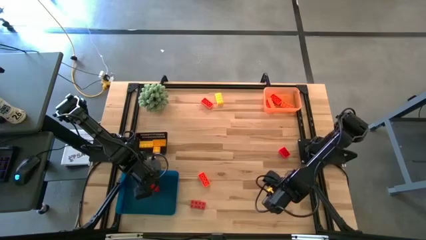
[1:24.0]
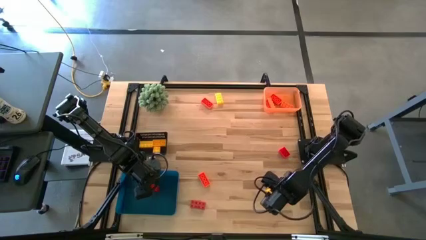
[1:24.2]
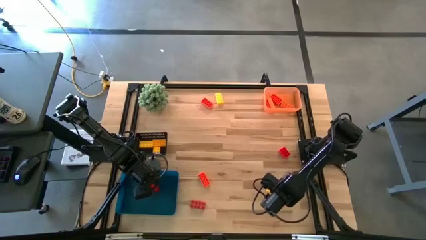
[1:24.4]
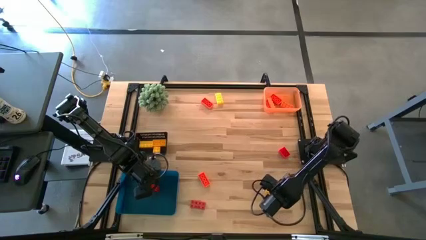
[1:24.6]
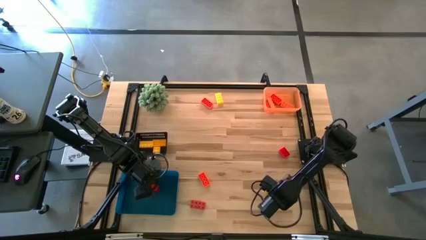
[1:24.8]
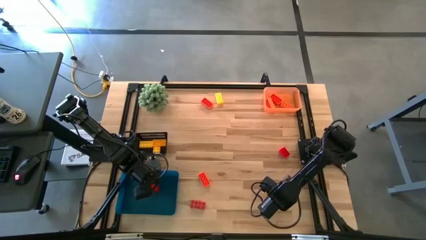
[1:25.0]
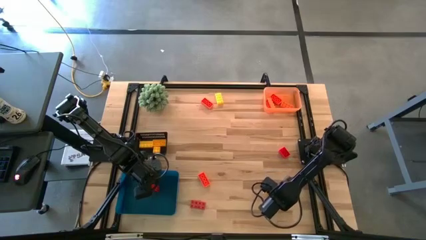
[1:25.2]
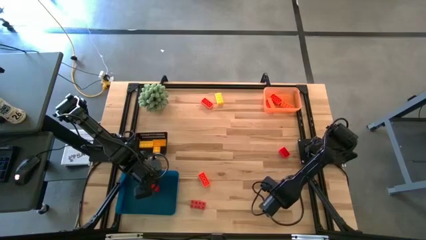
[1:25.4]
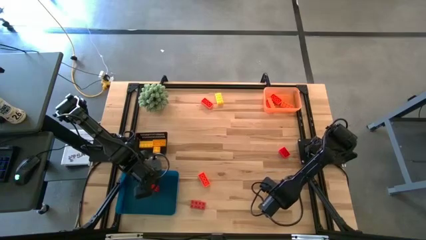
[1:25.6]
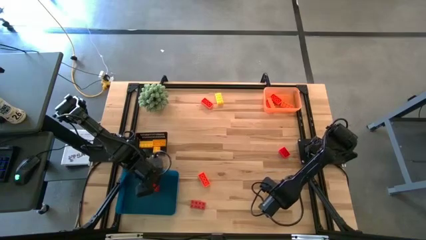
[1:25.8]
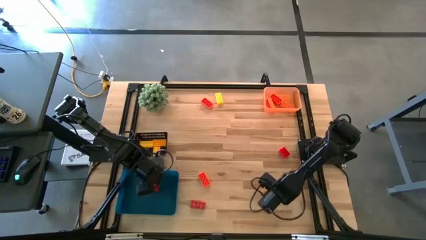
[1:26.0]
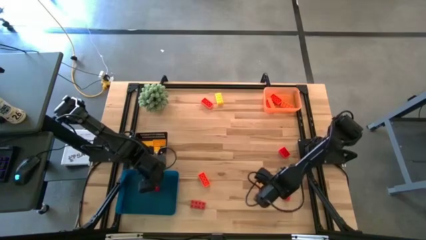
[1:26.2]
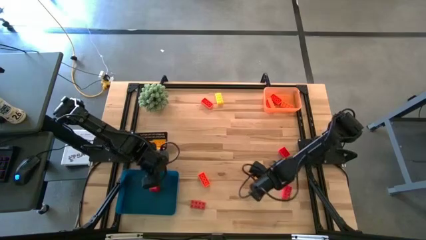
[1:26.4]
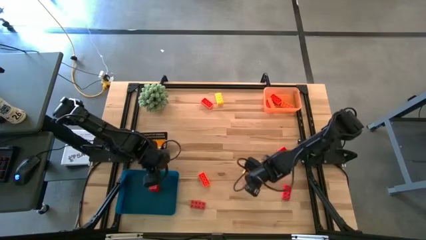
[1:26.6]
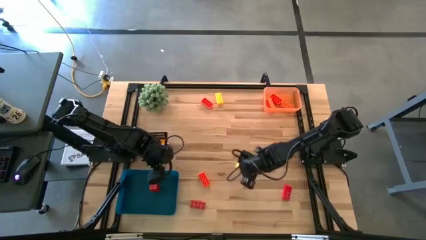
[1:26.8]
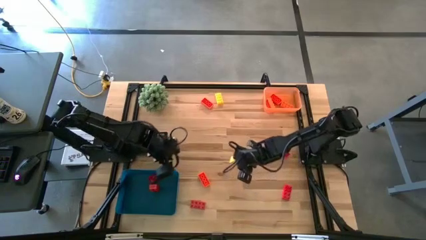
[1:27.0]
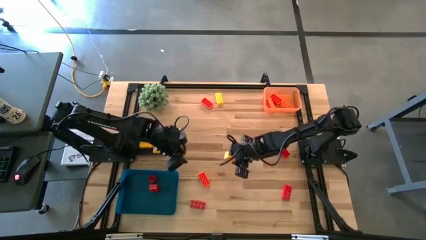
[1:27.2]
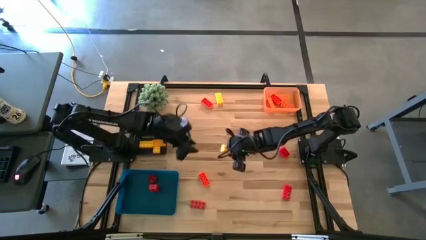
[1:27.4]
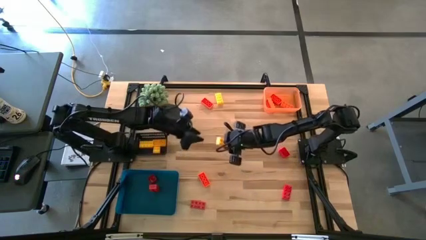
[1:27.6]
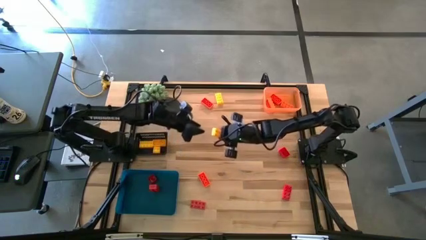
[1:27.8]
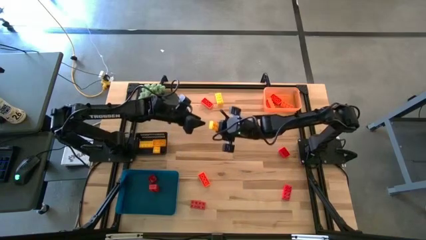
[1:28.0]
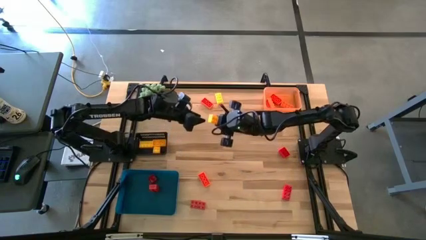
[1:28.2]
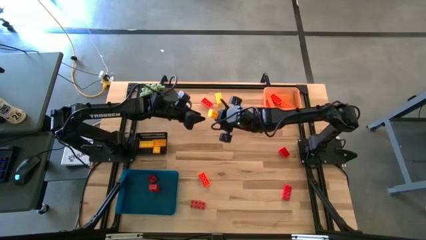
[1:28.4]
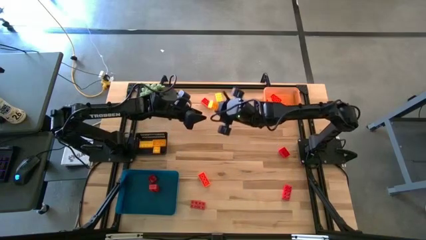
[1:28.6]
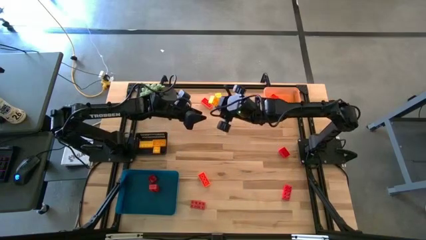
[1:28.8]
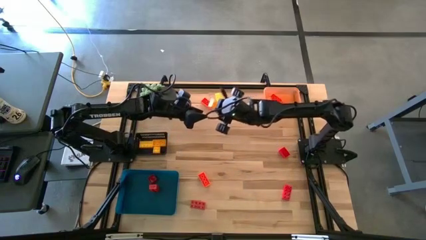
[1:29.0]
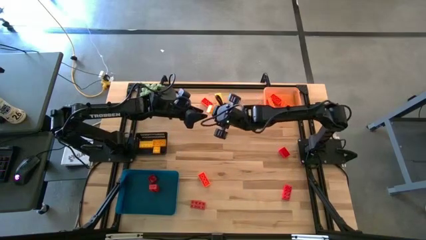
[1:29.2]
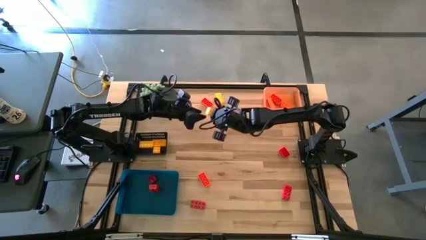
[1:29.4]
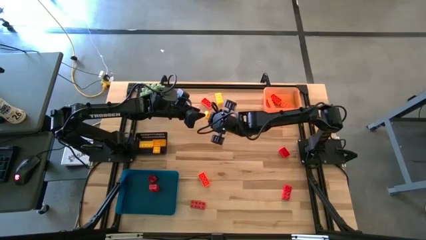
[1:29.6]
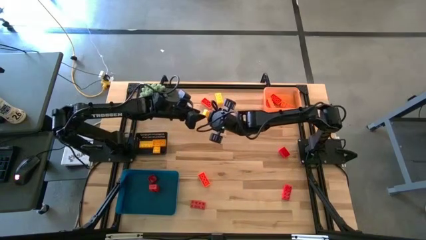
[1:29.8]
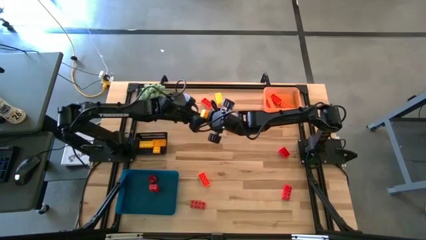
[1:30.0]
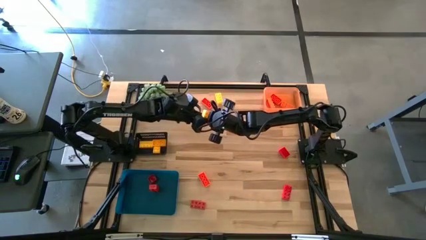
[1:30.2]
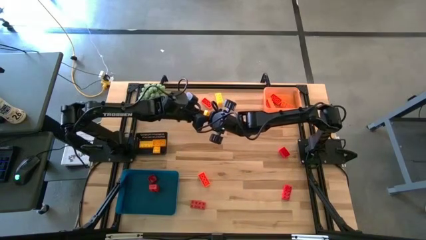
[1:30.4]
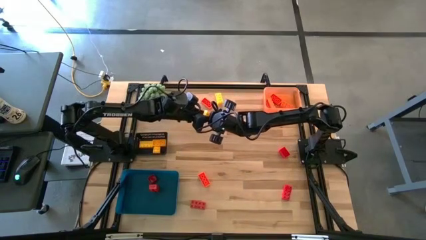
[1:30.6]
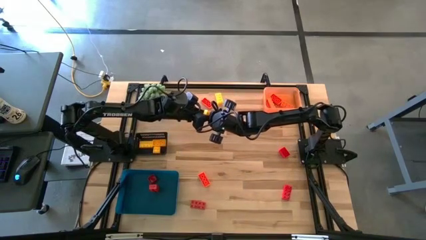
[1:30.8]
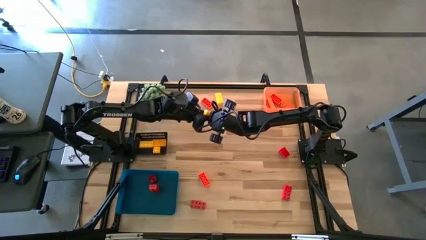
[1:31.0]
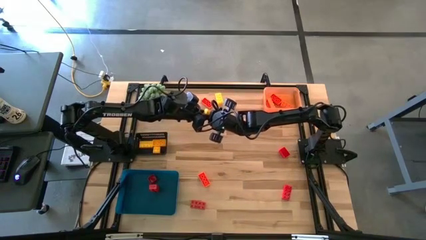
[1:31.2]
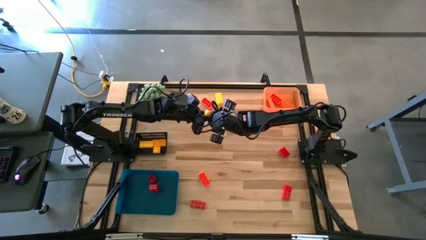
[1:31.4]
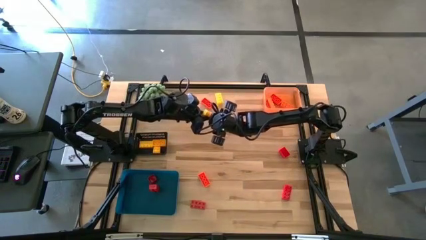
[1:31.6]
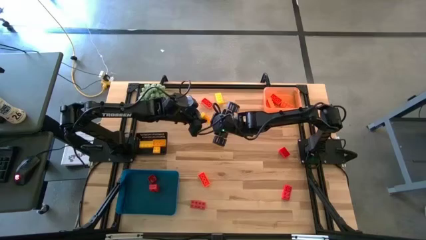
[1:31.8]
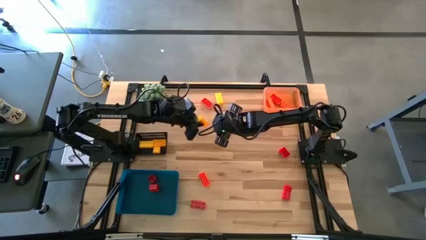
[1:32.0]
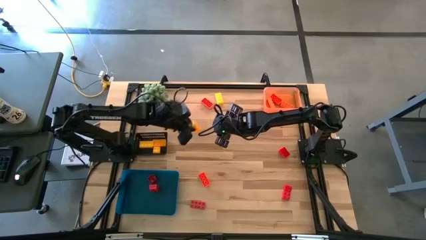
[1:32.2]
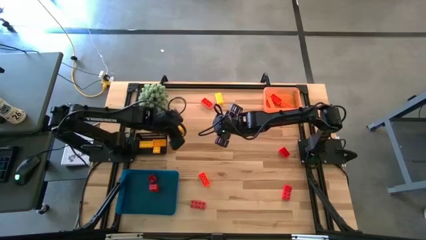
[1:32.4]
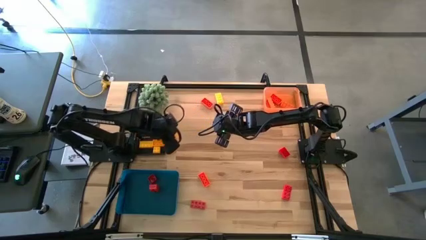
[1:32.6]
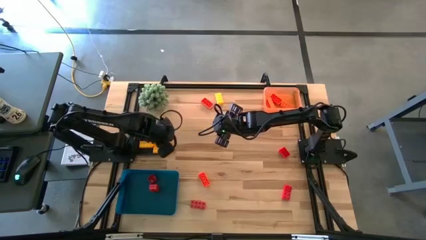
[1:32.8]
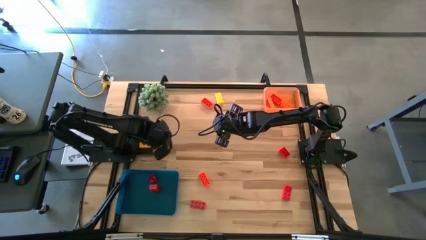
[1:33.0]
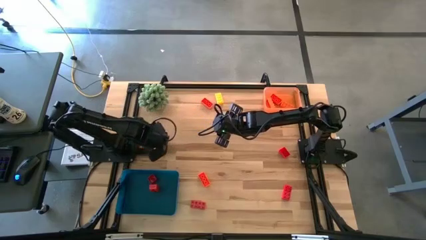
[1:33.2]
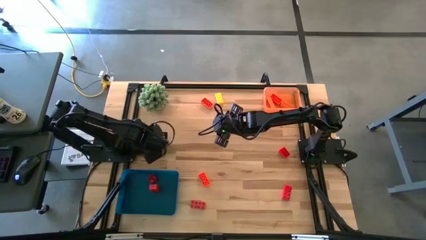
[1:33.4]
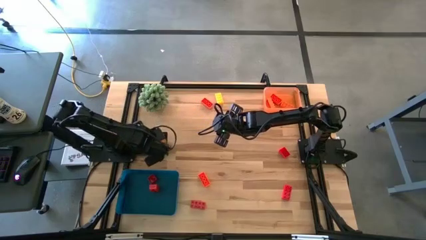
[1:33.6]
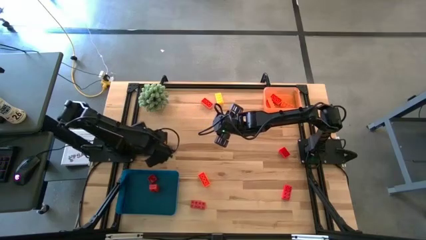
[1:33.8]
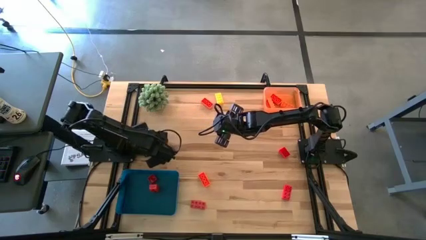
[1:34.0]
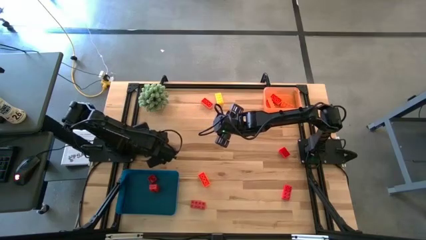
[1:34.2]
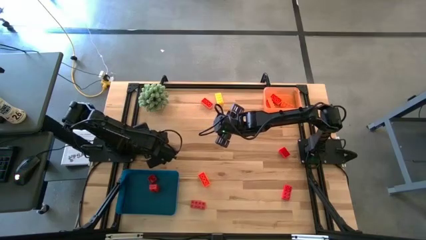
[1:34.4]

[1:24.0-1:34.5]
Task: Sort & place blocks by color
Put the yellow game piece into the black bin

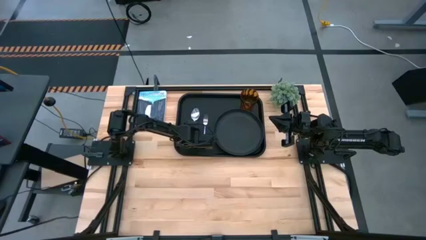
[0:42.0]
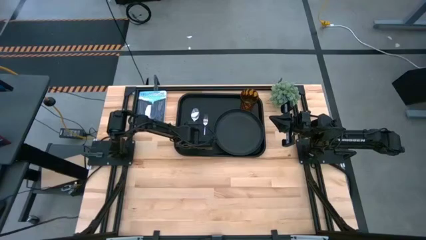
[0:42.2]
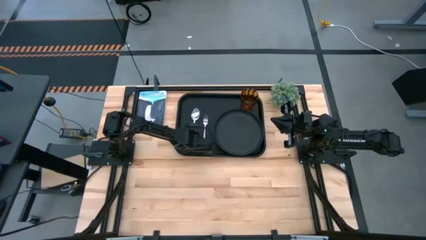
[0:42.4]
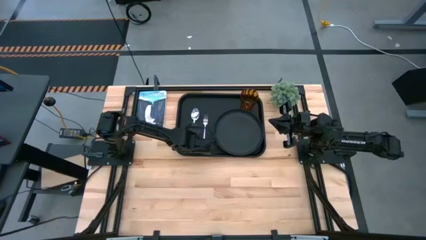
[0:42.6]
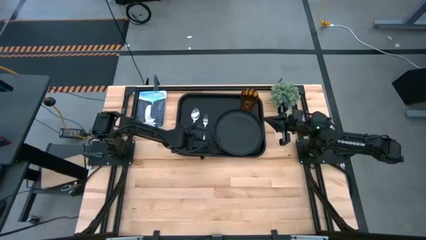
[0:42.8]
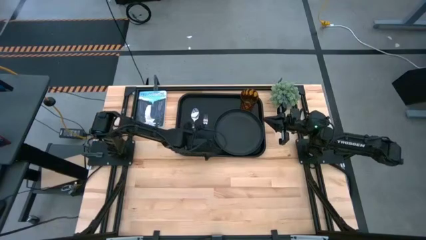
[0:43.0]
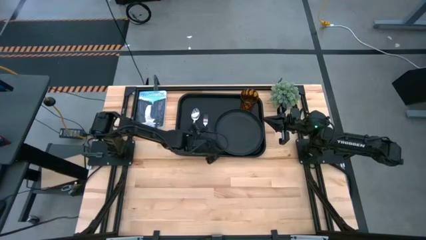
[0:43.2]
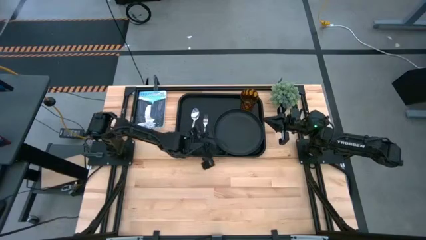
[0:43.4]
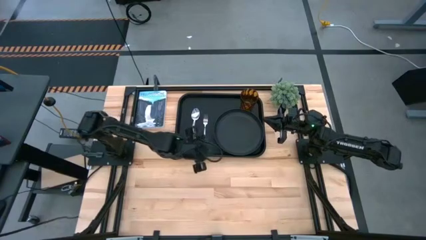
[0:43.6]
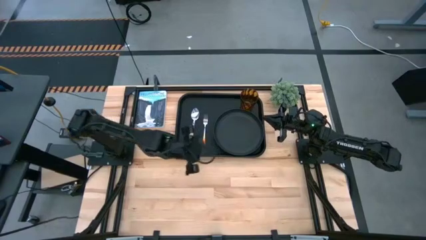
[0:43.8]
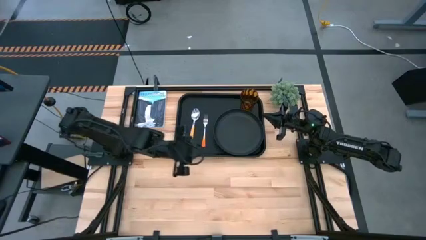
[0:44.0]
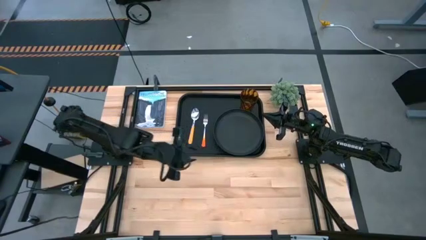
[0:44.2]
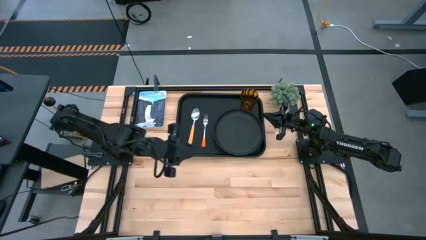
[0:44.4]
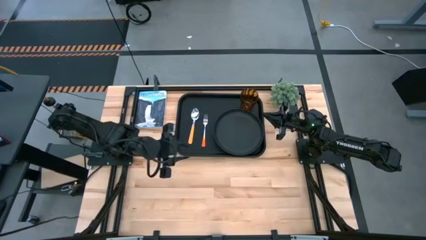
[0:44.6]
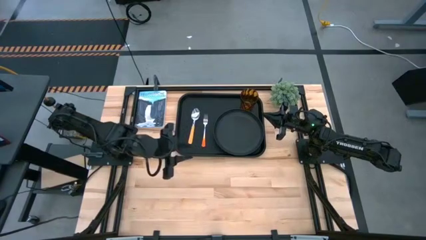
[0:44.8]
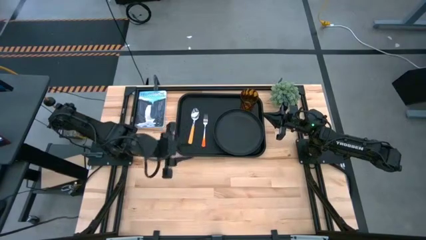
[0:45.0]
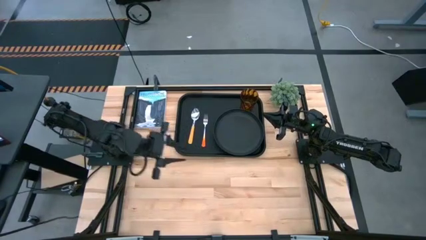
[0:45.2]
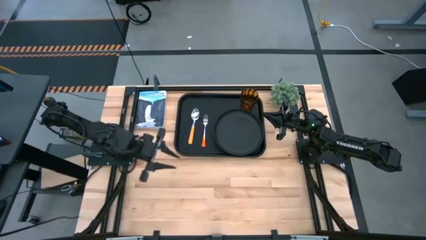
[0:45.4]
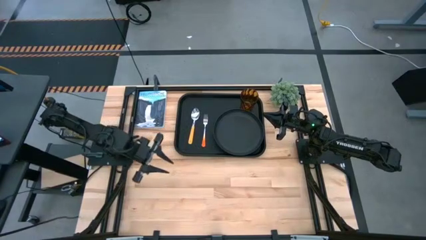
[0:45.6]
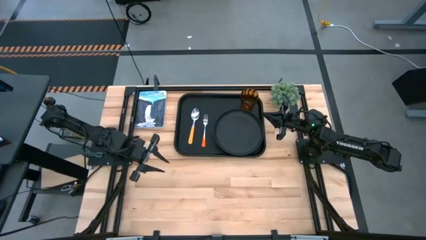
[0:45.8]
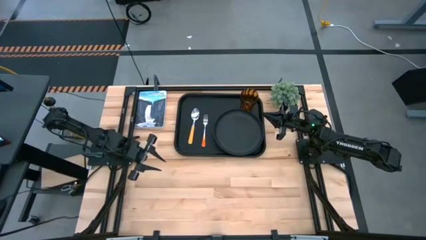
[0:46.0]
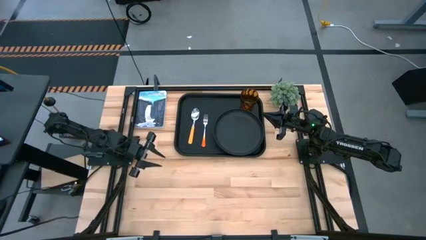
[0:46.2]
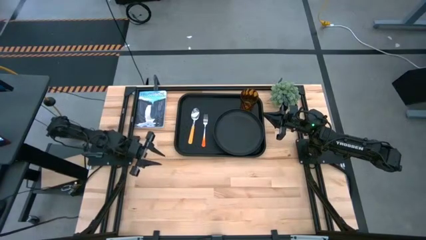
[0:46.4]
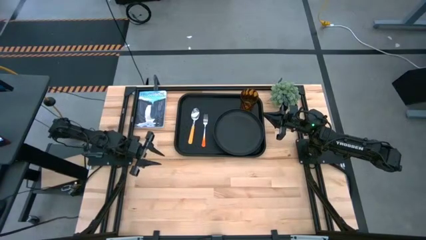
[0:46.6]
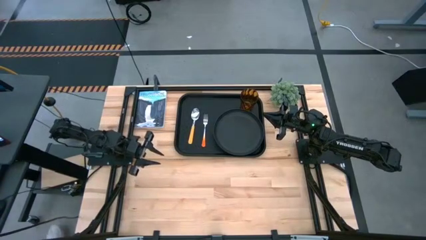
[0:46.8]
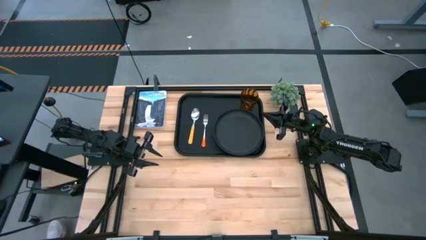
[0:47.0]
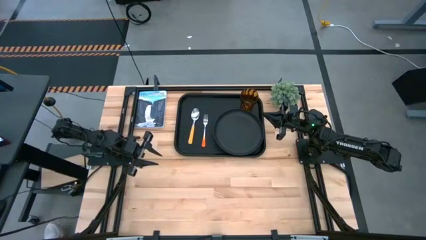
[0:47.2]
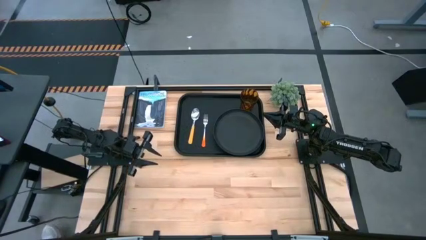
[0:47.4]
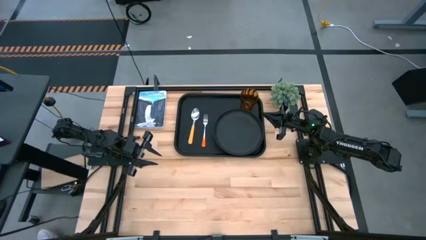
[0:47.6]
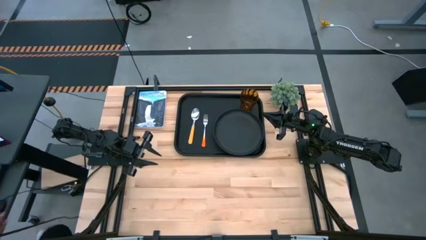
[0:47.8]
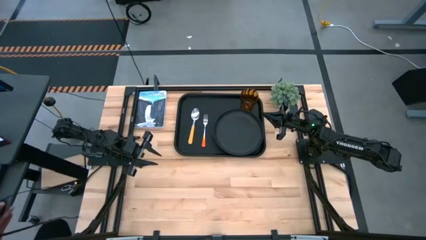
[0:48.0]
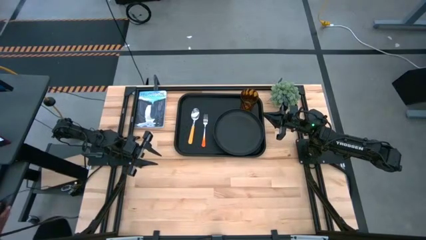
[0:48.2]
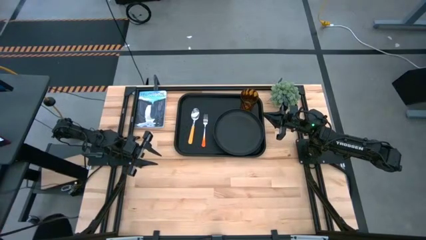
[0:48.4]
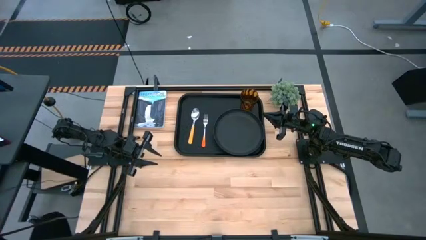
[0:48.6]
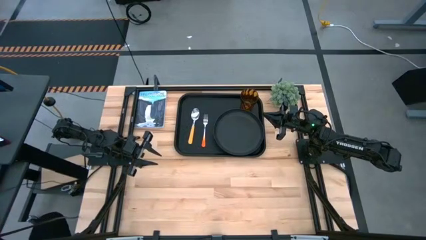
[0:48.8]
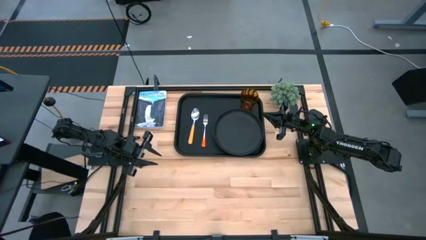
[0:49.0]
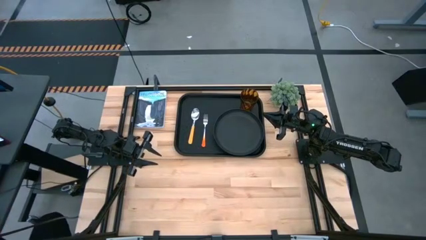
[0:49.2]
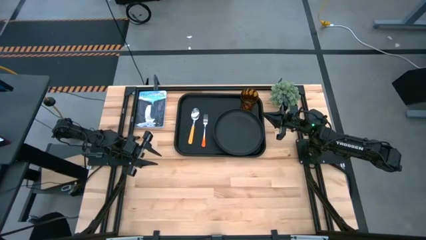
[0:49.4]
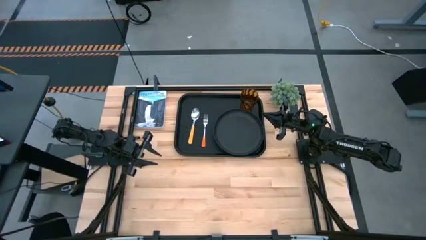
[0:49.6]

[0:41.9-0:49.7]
Task: Pick and place plate/cup/fork/spoon on tray
Return to Home Position
